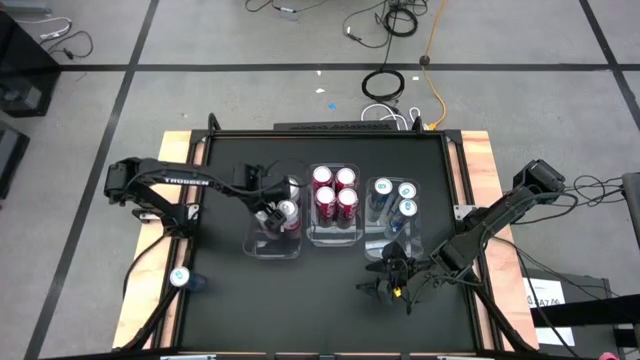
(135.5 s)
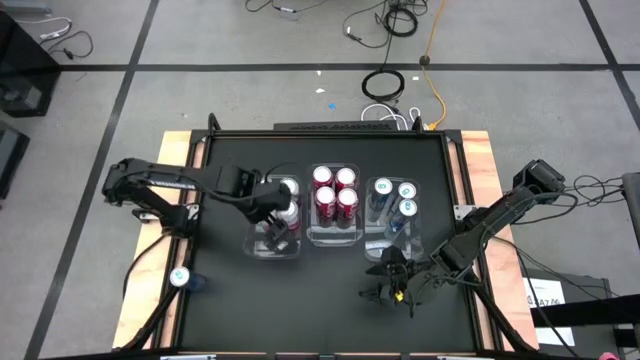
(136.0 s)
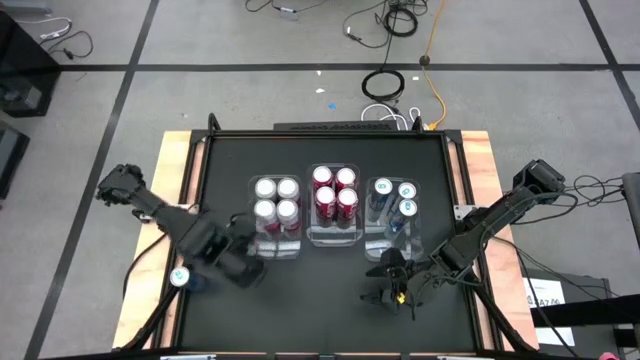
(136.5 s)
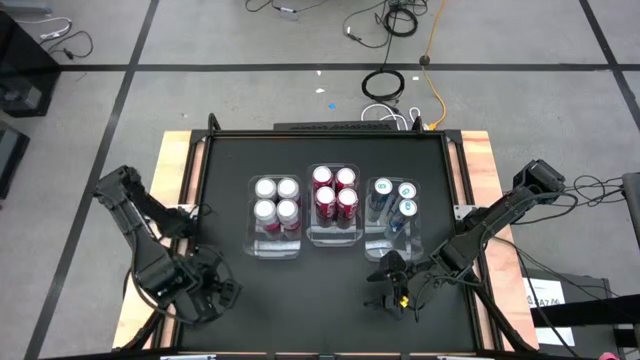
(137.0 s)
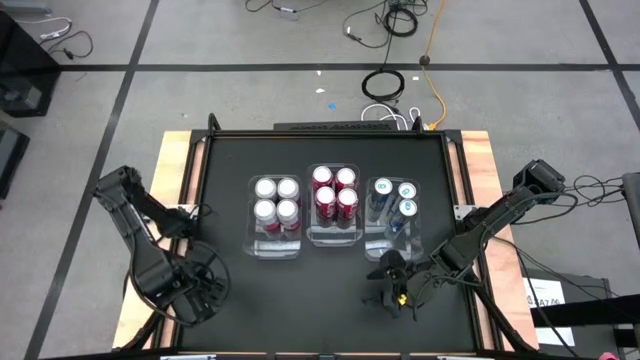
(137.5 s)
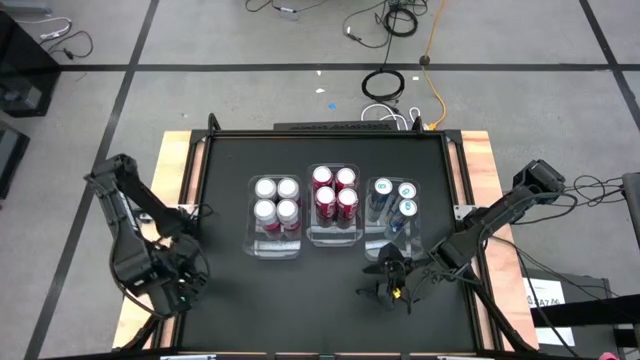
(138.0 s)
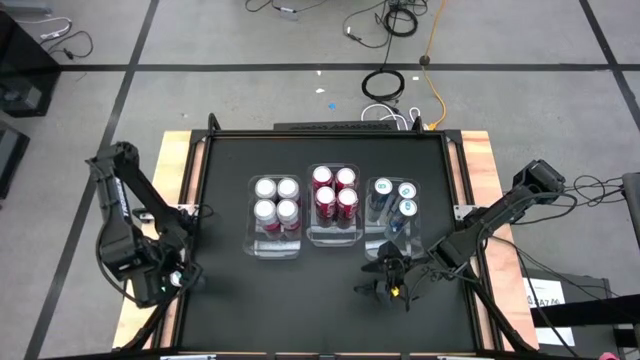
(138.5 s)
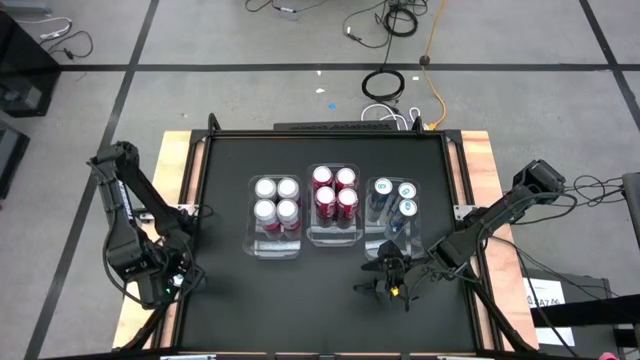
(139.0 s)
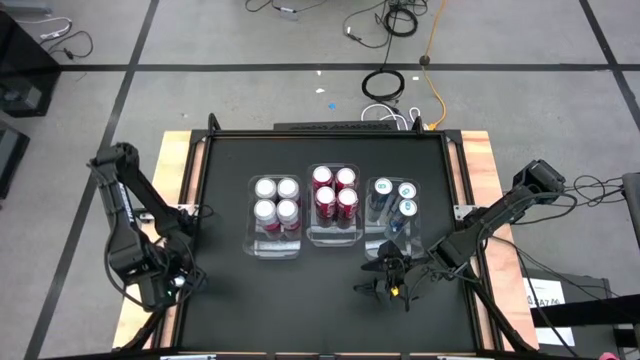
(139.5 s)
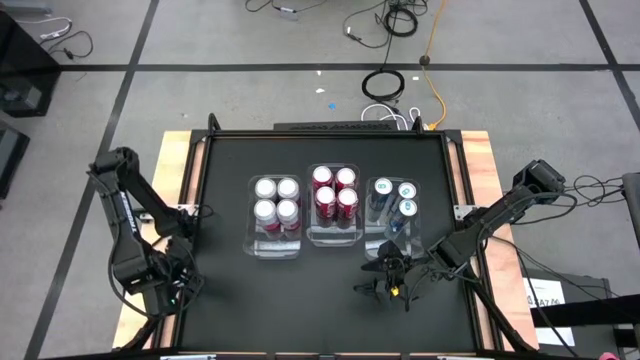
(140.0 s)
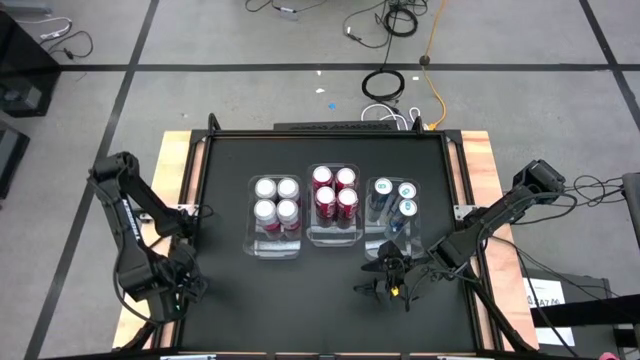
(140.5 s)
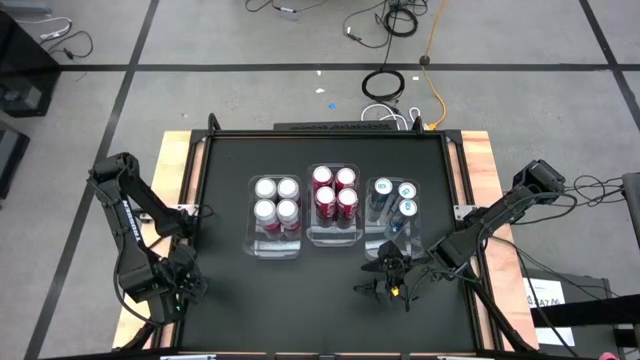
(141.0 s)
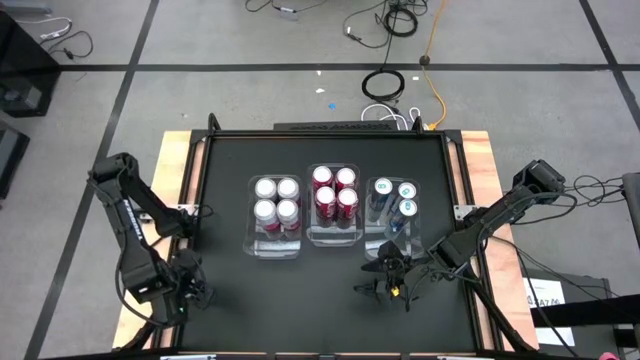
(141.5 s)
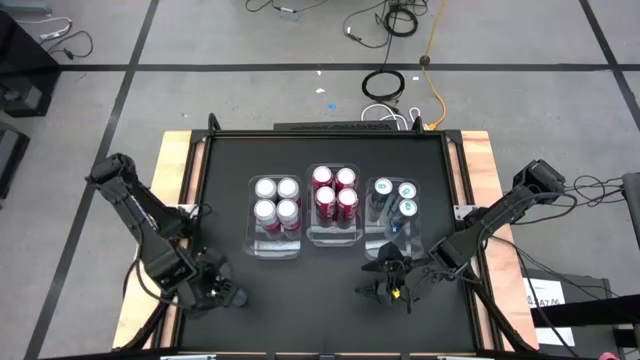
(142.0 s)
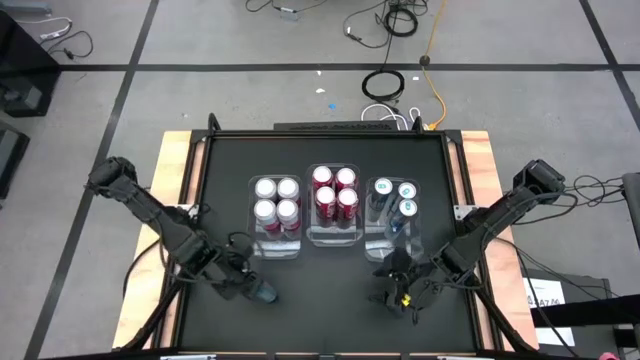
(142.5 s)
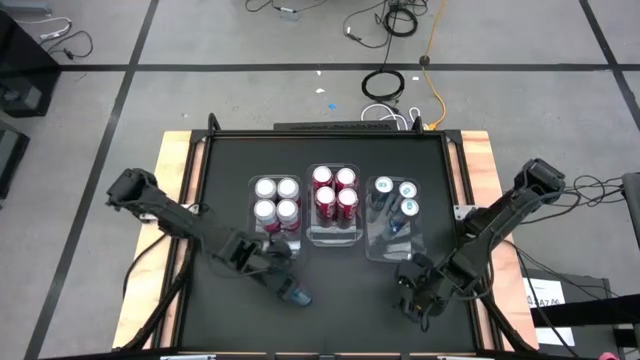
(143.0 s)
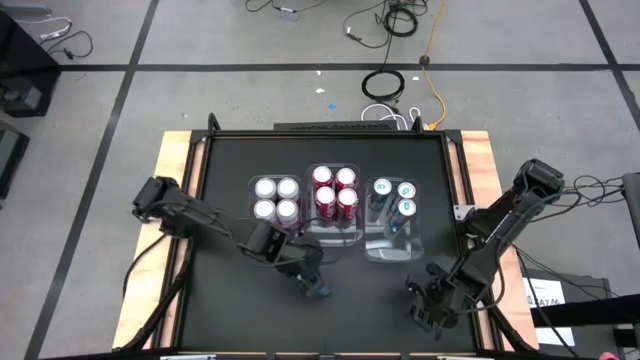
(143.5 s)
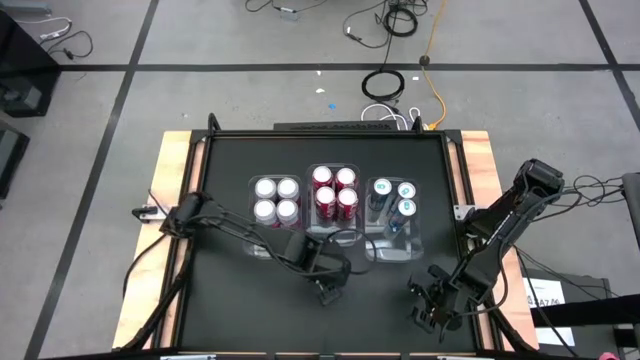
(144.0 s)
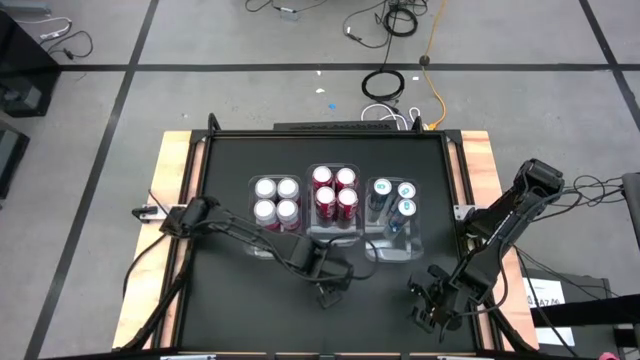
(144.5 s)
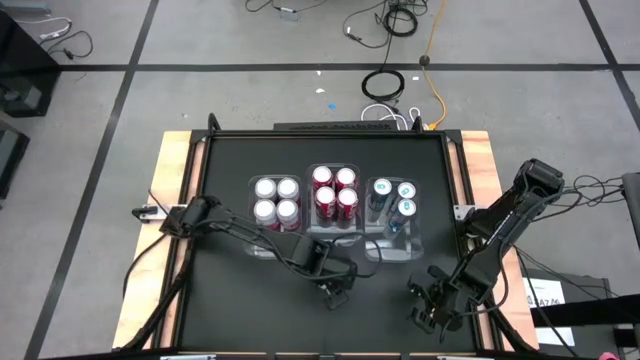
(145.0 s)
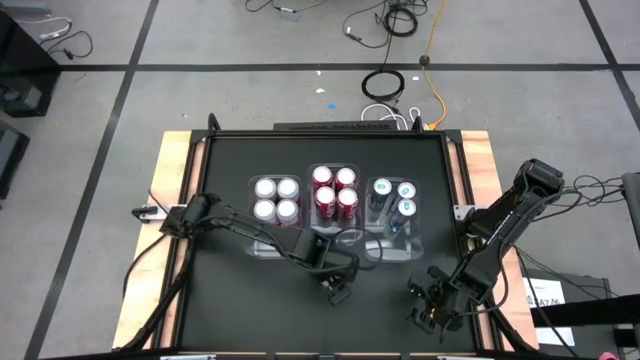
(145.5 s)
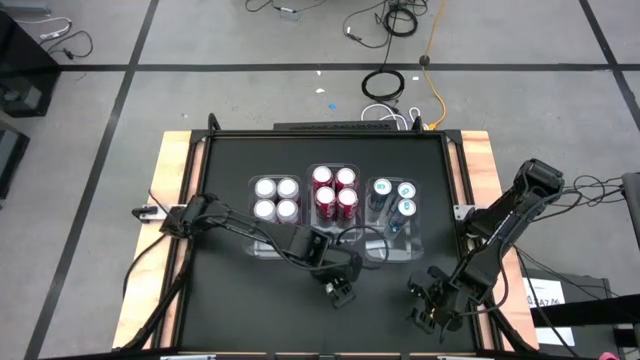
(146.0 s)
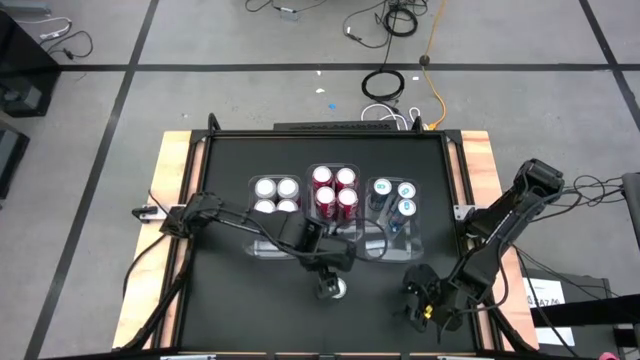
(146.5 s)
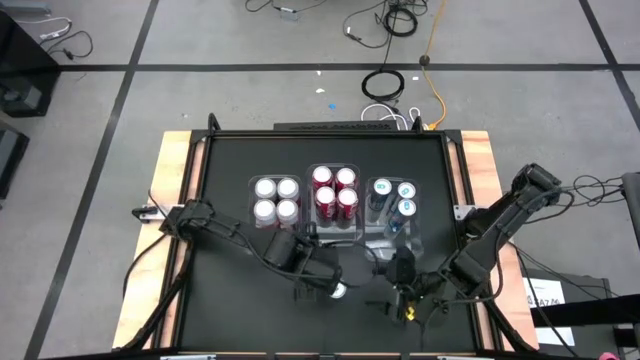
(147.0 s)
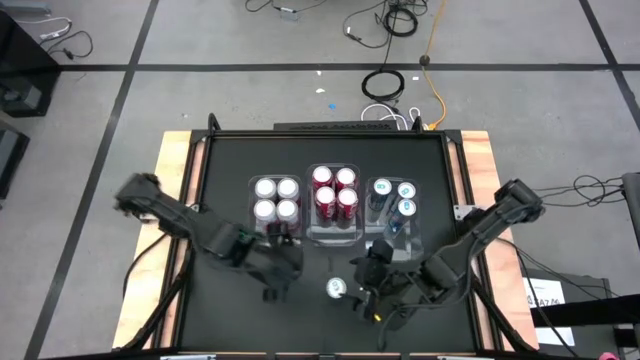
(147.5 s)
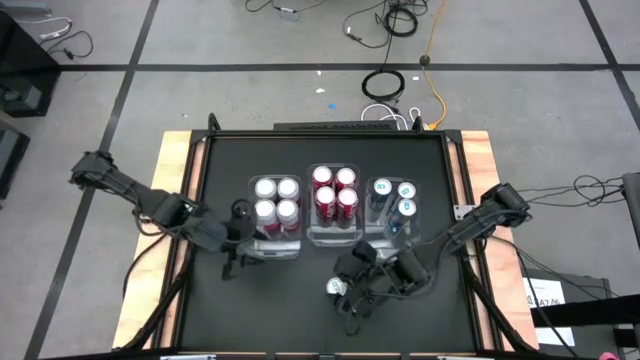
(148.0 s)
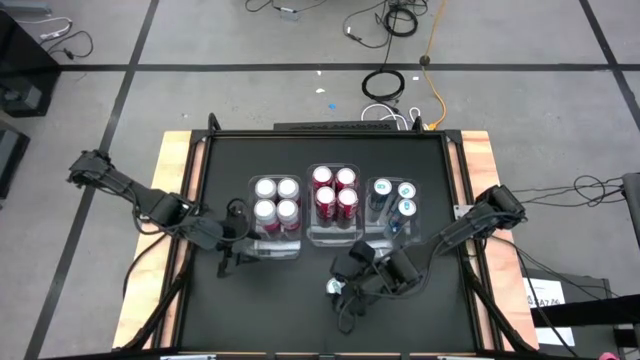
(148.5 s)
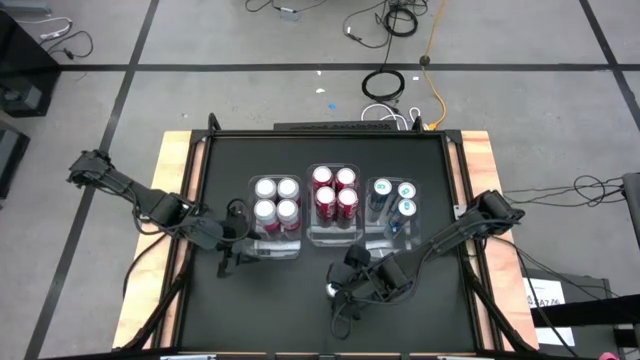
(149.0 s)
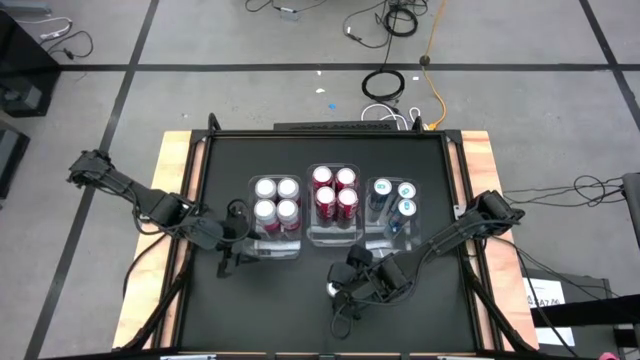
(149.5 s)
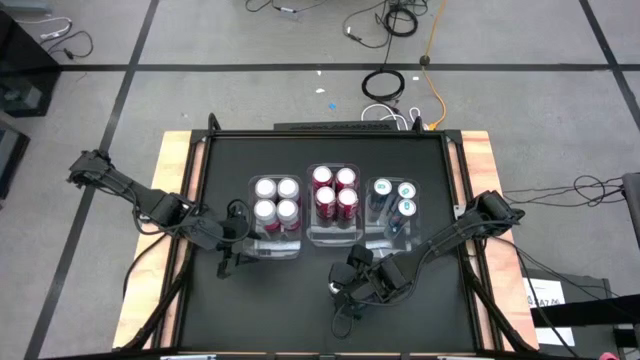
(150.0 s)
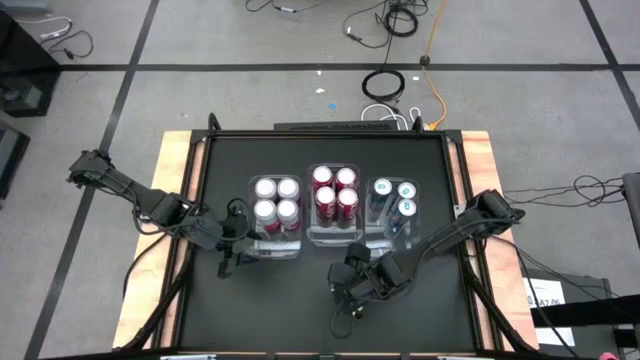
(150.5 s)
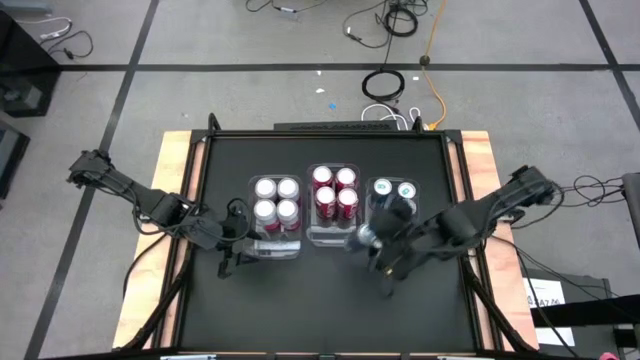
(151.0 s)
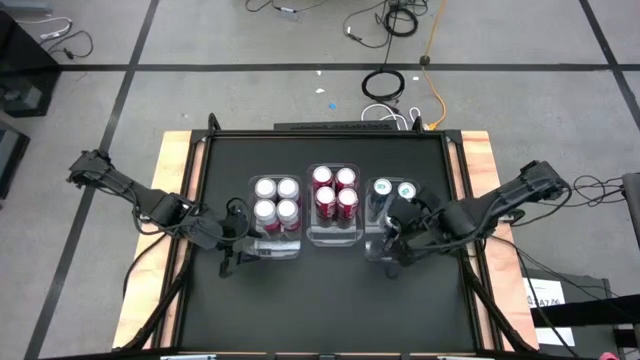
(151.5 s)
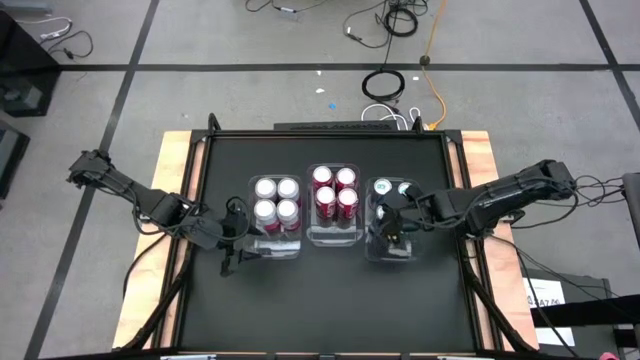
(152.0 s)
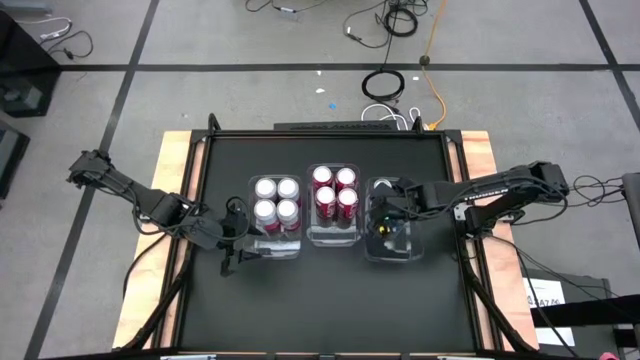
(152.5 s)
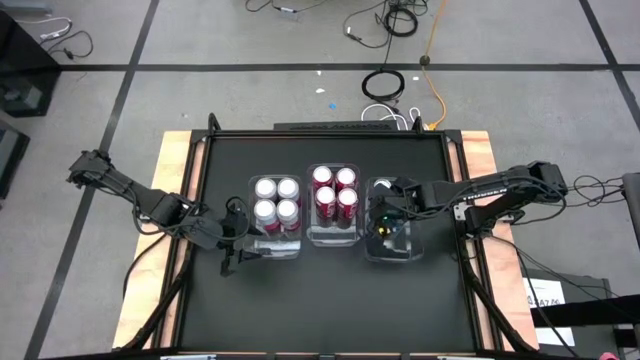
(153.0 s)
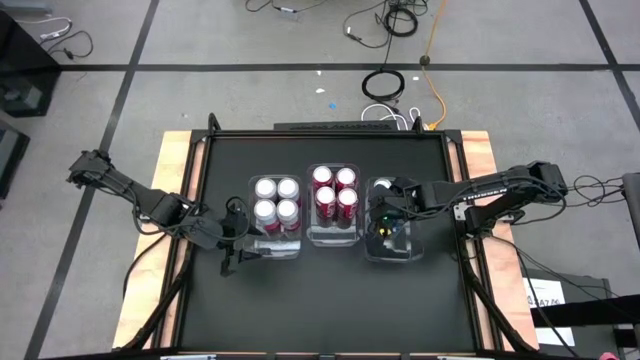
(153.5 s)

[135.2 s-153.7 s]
Task: Sort soda cans
Put the silver blue soda can into the middle right transparent bin

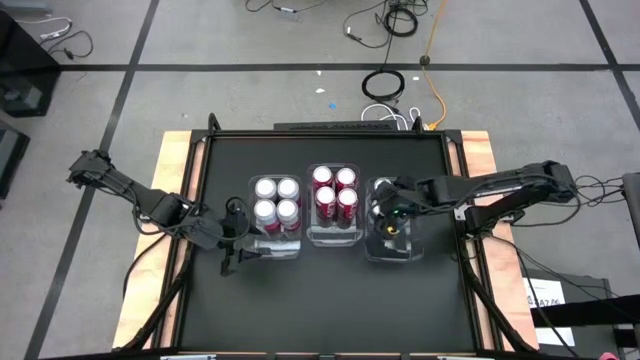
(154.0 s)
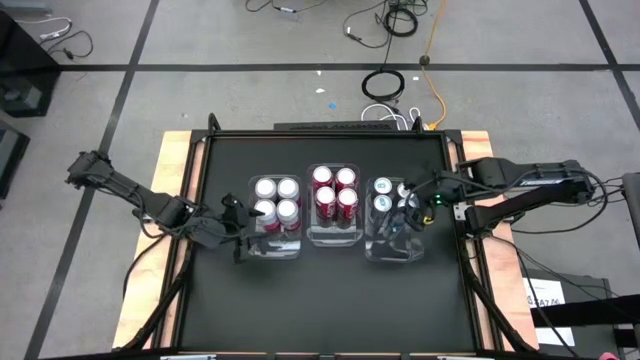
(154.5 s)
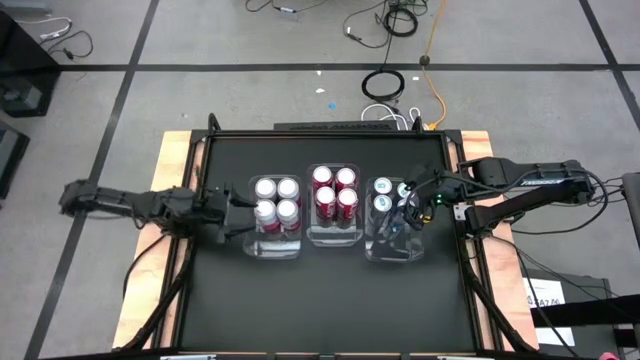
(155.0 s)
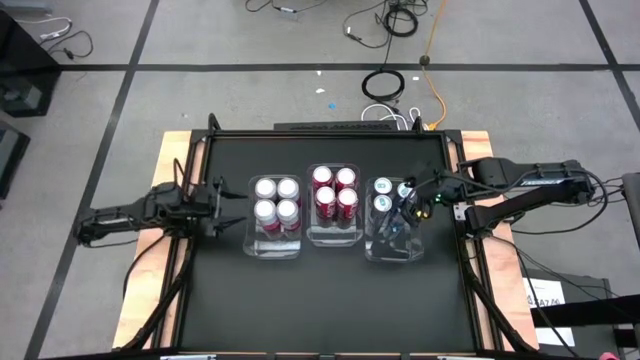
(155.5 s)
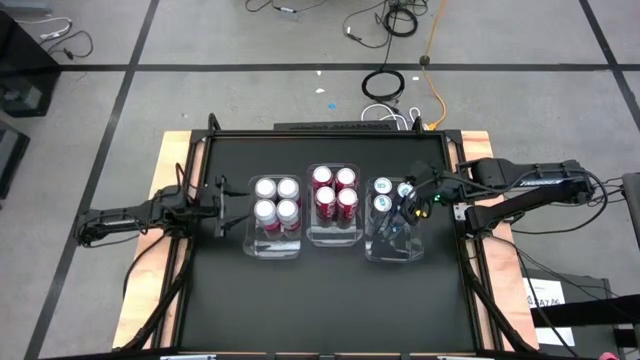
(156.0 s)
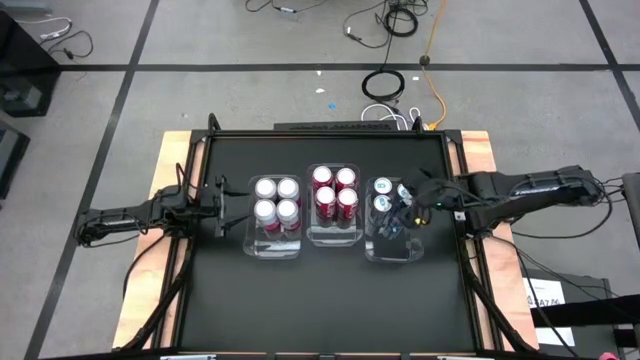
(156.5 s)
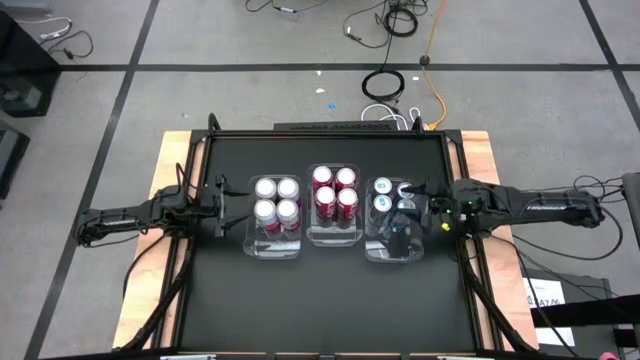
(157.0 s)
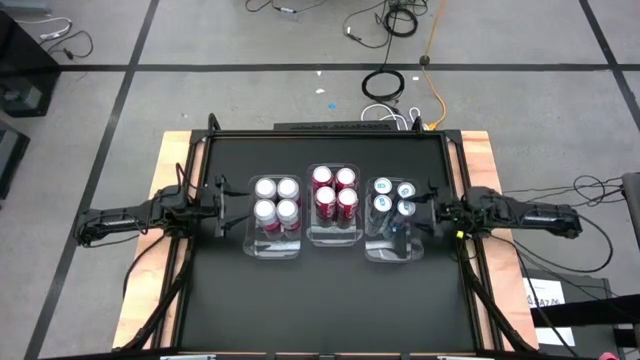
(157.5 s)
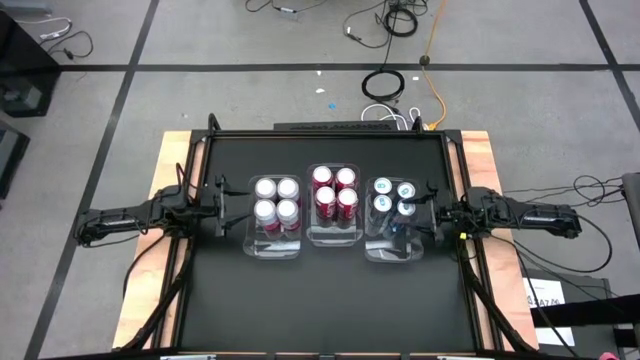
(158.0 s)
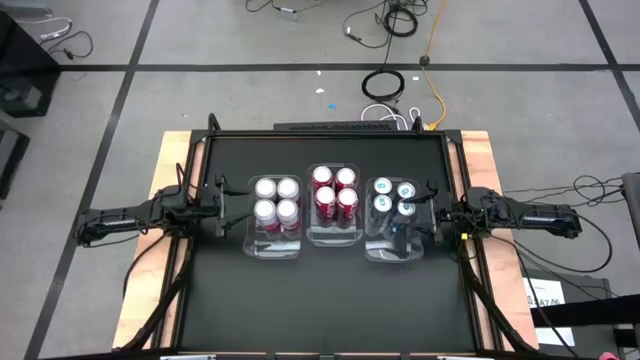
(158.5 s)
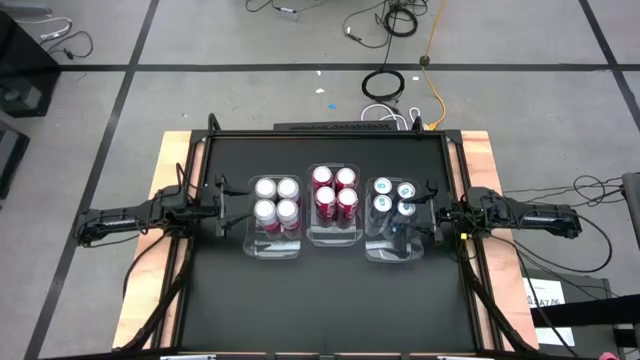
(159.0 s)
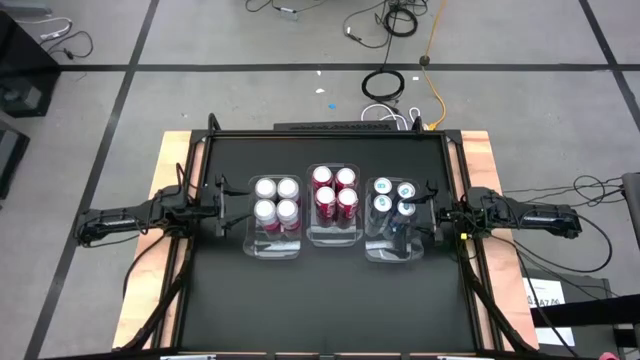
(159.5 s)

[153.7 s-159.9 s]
Return to Home Position
